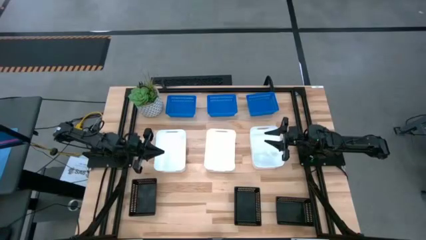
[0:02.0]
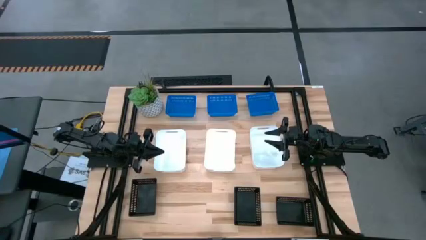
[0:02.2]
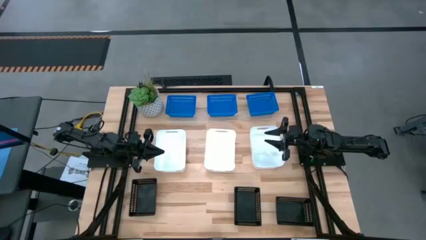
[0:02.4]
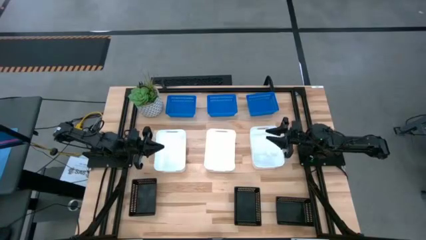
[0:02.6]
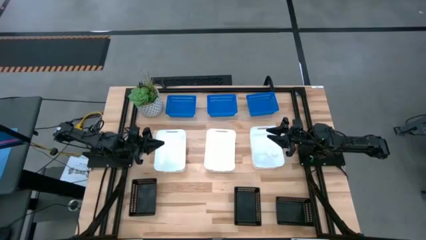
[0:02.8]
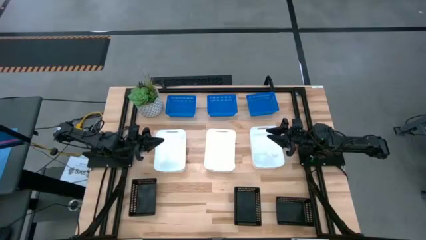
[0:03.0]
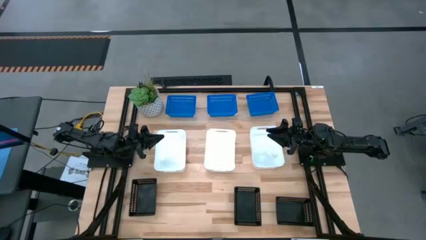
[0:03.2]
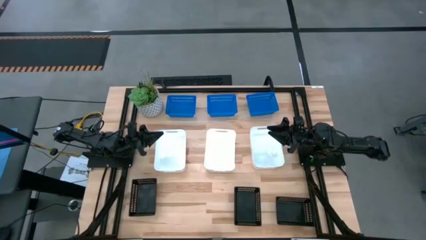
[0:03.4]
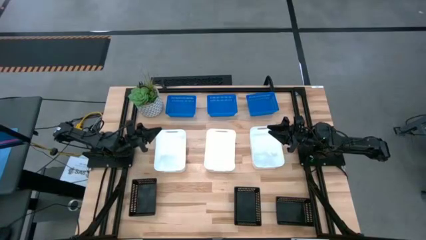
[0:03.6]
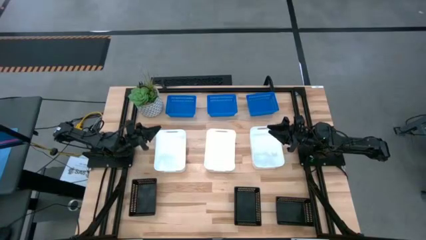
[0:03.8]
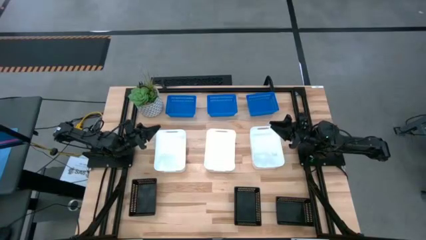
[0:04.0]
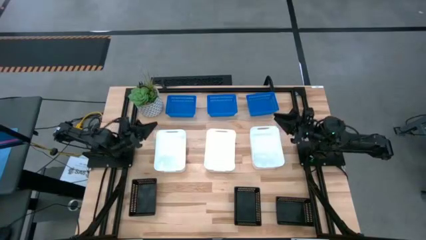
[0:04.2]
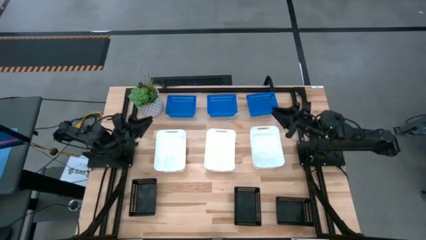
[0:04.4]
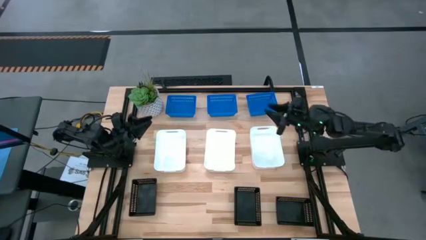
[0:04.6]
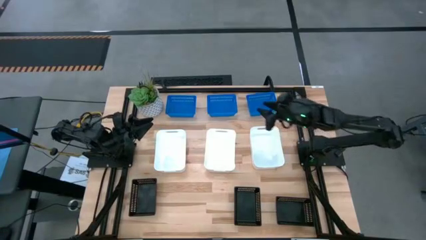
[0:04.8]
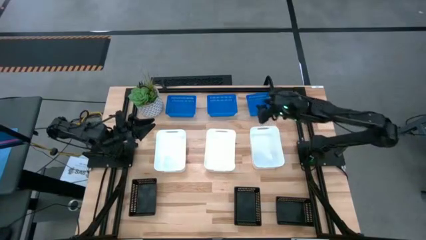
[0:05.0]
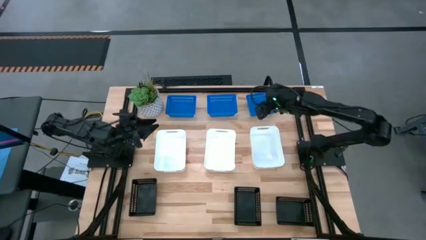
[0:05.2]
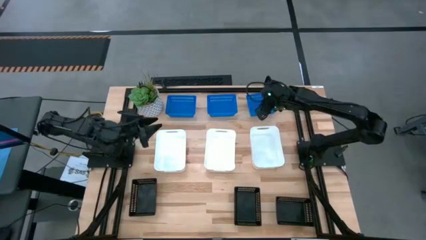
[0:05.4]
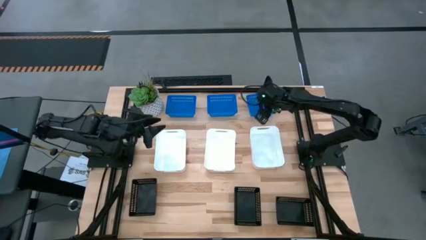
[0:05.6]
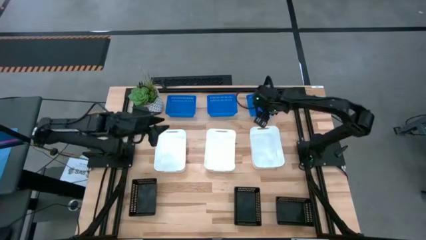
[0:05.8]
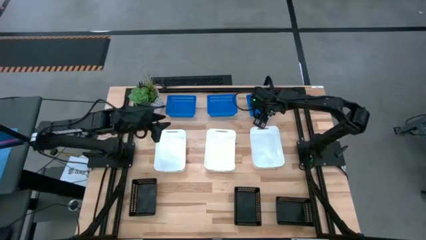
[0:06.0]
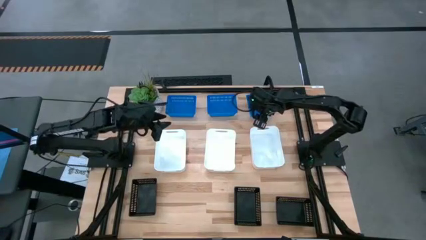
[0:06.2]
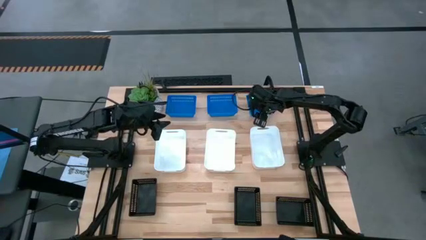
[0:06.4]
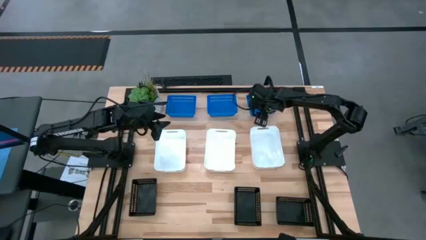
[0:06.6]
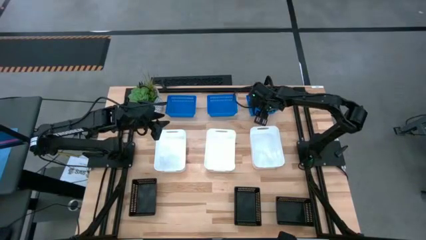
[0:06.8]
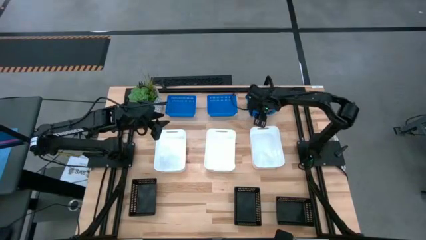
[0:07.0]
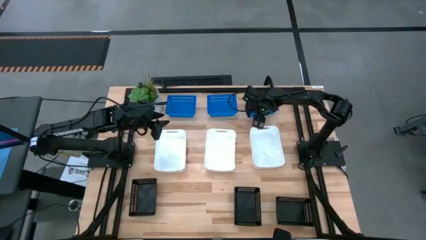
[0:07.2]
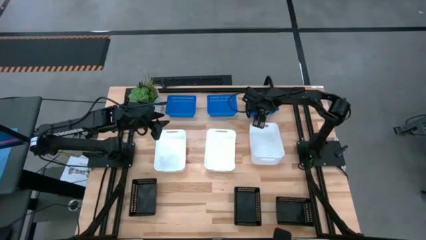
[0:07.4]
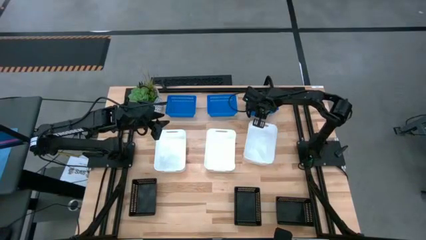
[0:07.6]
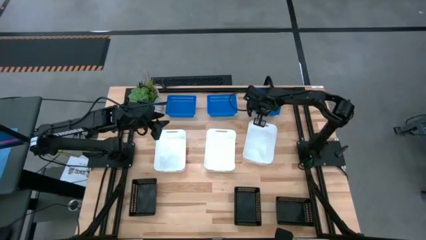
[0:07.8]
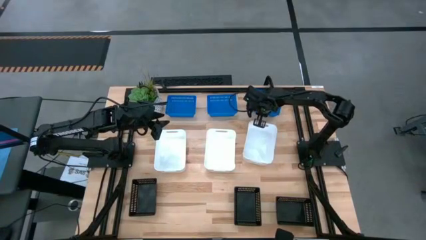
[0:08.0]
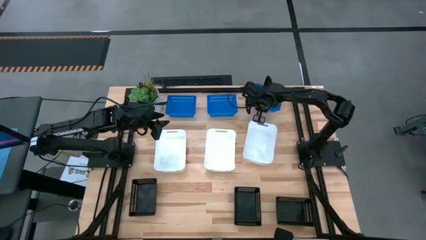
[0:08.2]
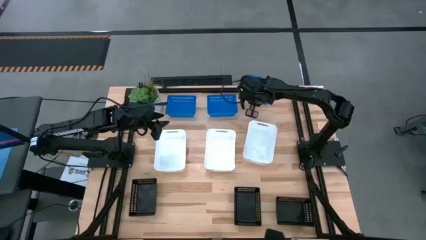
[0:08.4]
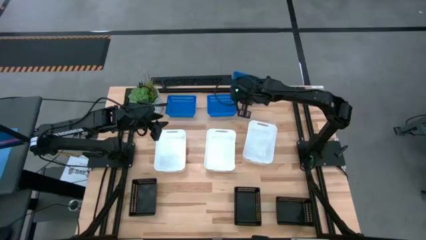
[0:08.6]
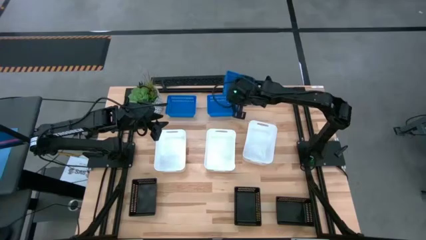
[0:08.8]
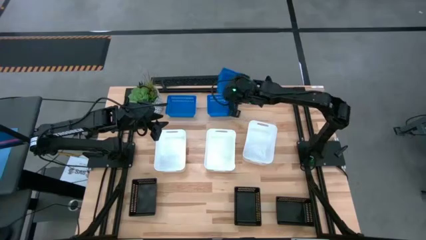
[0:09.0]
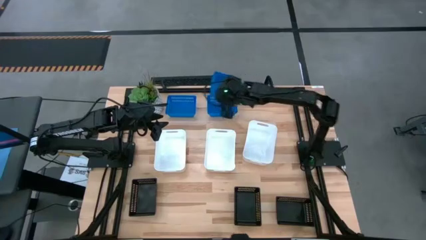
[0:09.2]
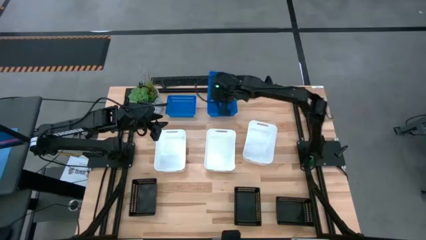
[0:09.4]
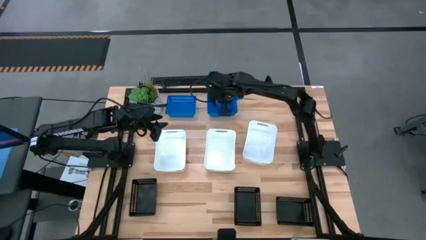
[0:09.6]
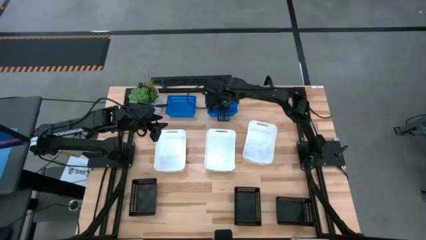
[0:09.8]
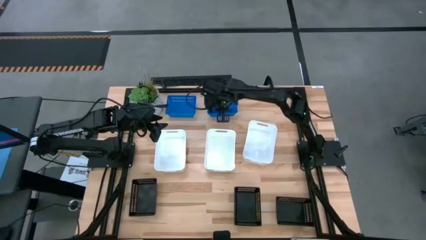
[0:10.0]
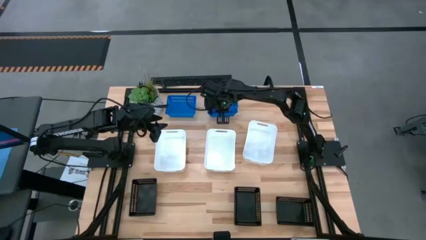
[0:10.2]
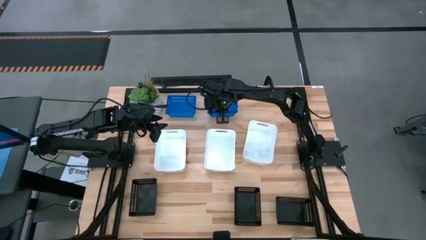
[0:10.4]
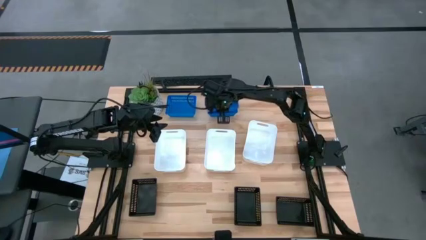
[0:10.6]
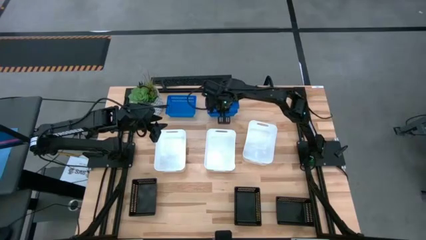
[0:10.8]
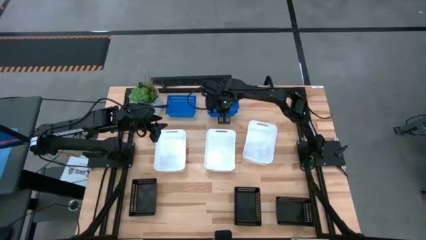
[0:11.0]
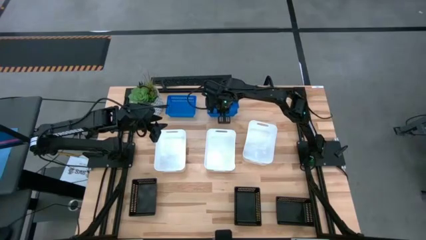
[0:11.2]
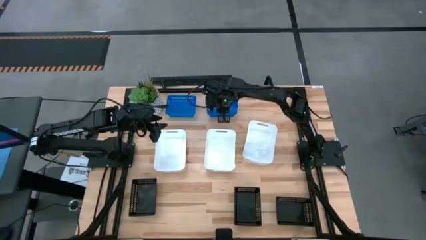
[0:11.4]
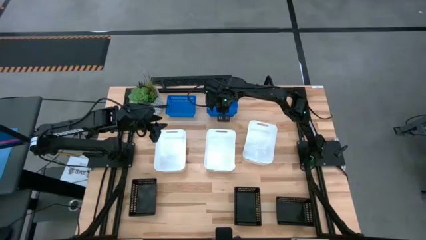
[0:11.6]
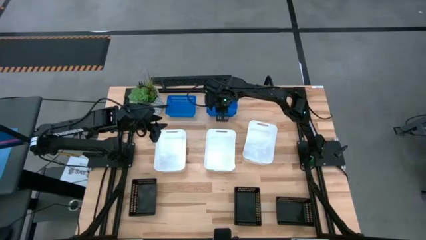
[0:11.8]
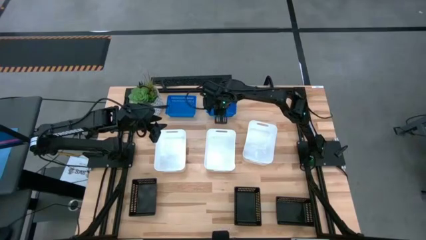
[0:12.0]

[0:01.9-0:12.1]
Stack the right blue bin on the right blue bin

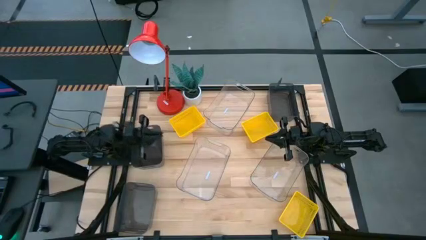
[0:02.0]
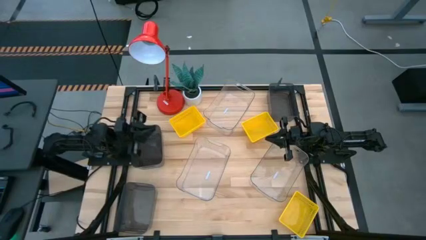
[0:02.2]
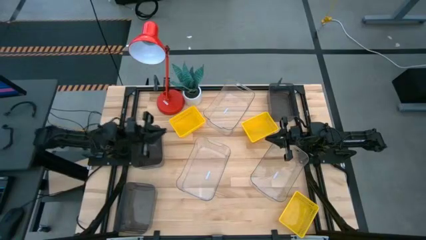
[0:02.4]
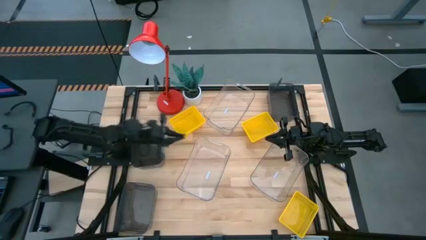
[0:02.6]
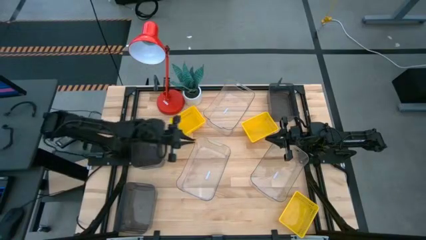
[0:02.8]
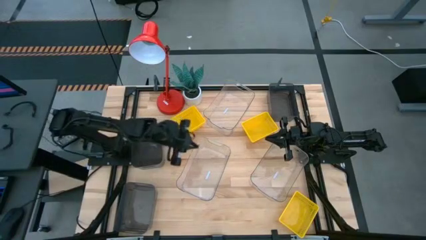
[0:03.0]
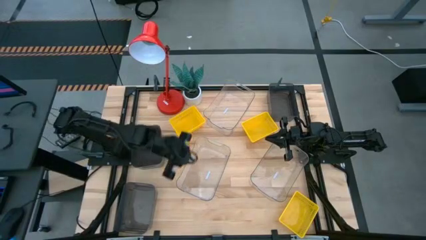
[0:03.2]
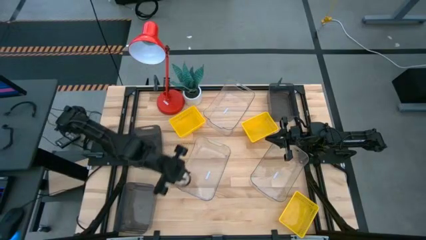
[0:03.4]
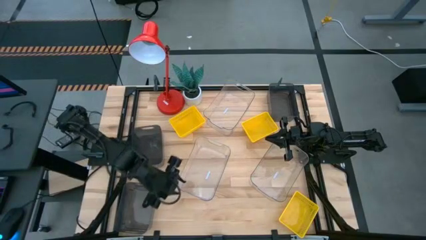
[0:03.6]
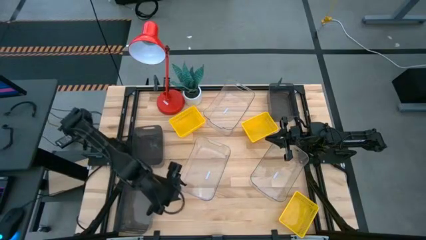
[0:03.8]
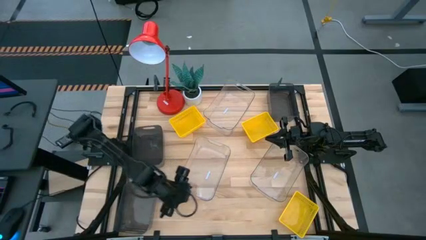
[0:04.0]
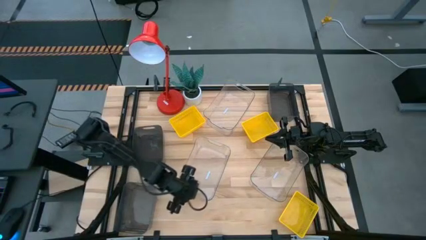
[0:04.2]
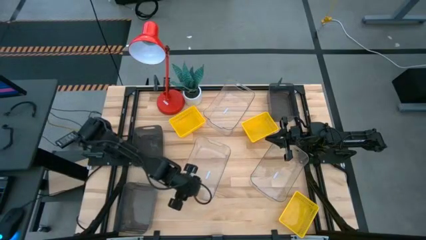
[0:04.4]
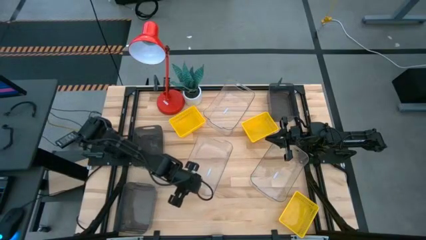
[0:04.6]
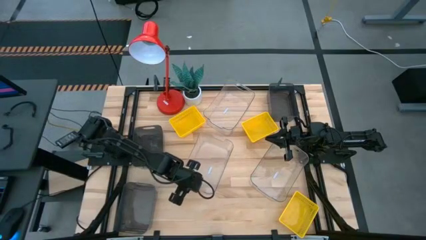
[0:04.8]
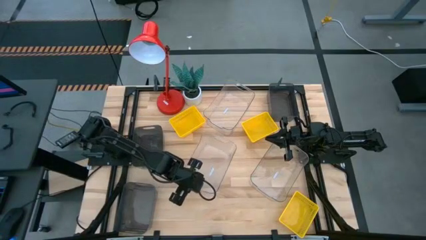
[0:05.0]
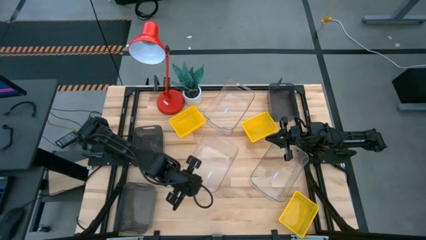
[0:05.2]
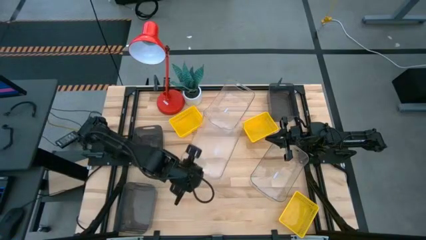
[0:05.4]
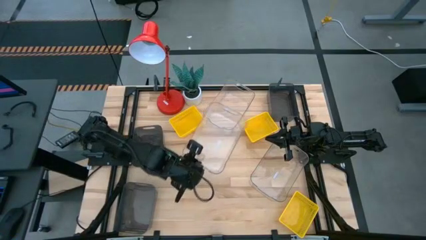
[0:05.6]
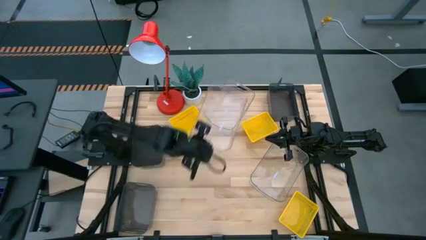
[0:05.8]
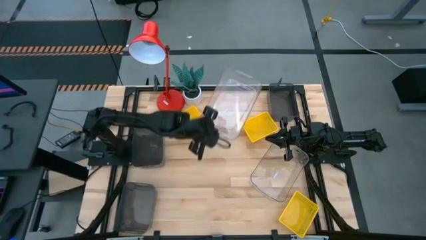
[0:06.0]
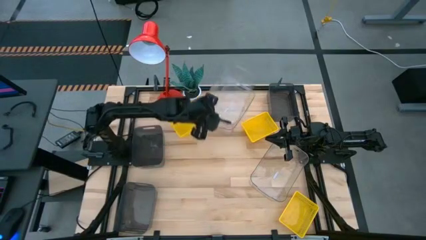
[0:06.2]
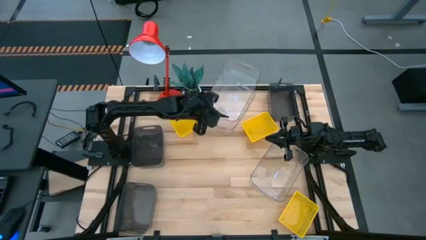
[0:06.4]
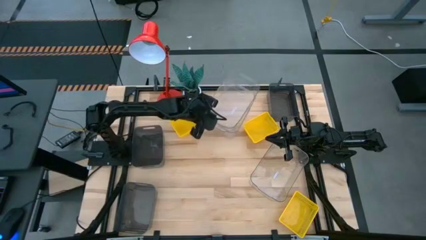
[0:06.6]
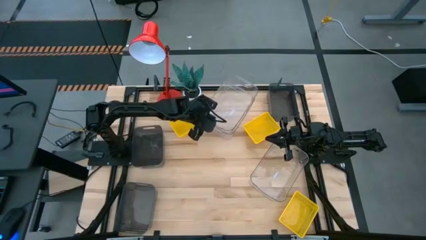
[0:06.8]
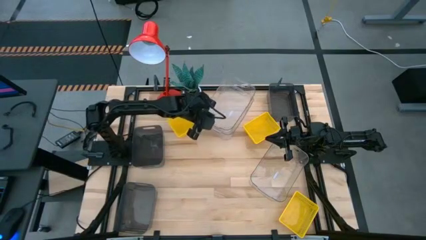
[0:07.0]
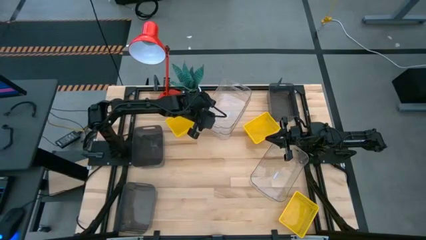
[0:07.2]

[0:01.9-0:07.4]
Stack the bottom left transparent bin on the top transparent bin
